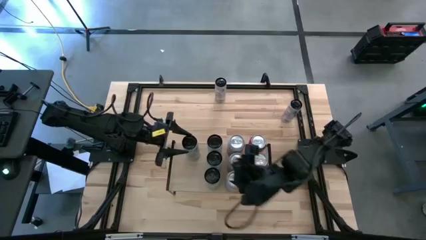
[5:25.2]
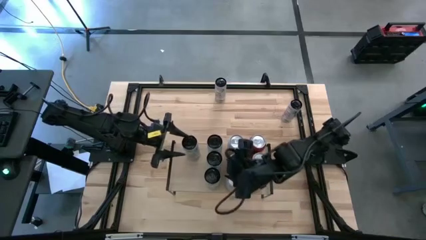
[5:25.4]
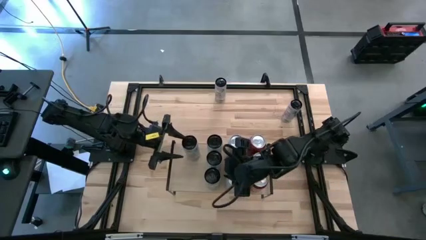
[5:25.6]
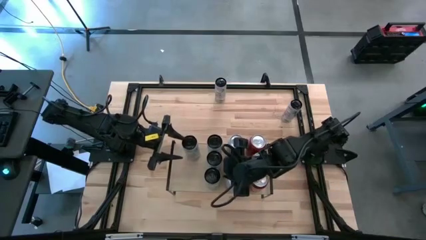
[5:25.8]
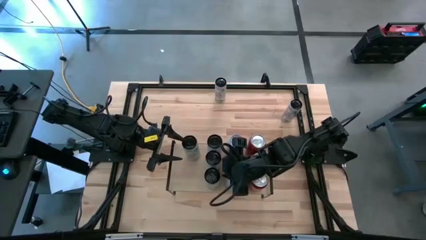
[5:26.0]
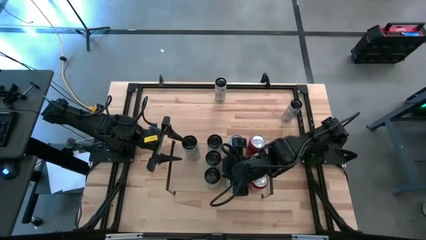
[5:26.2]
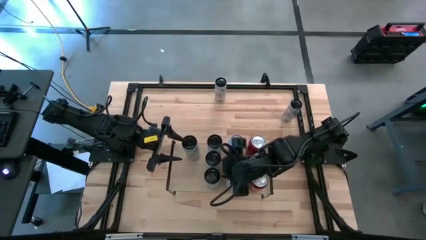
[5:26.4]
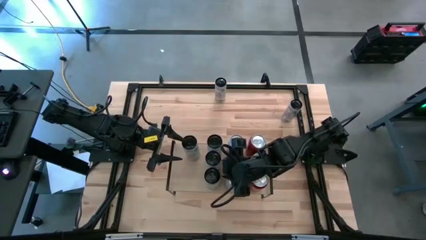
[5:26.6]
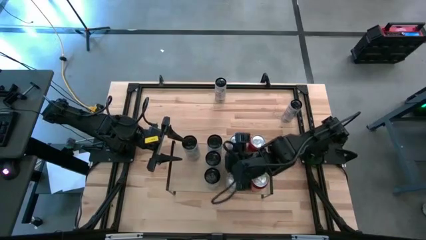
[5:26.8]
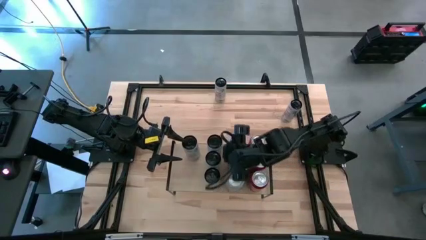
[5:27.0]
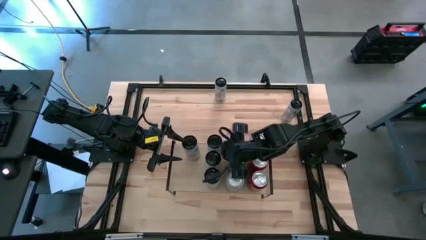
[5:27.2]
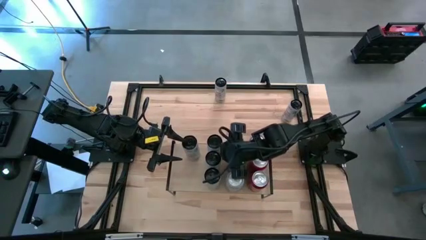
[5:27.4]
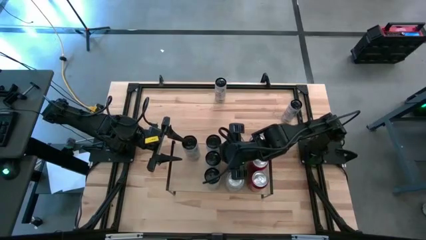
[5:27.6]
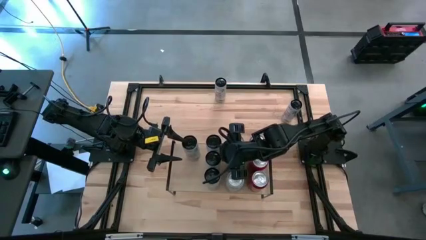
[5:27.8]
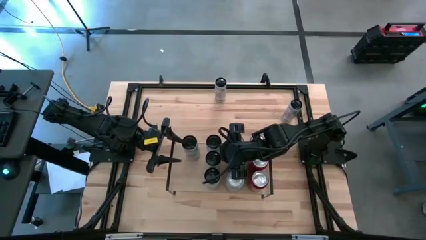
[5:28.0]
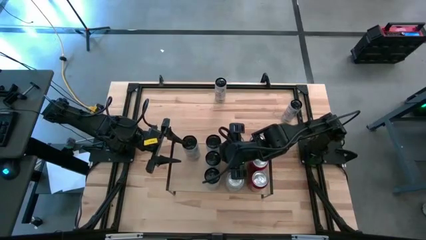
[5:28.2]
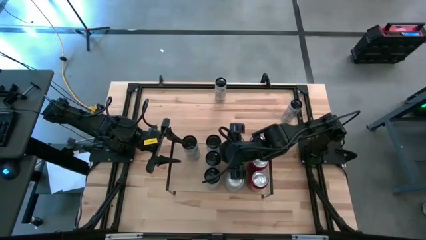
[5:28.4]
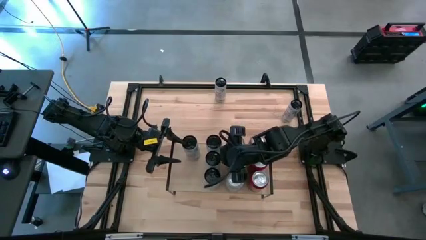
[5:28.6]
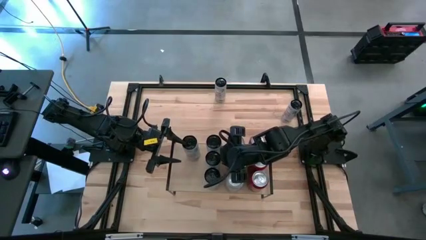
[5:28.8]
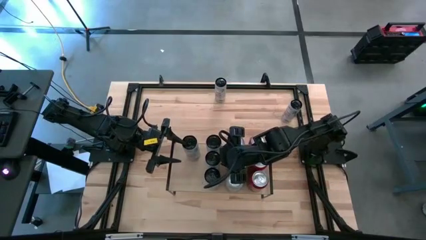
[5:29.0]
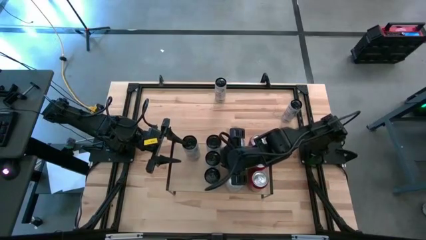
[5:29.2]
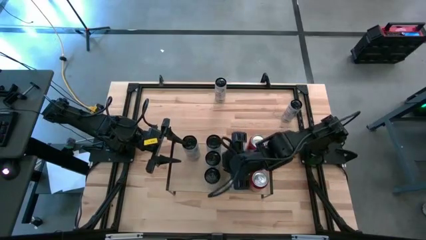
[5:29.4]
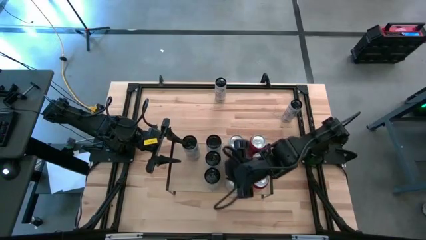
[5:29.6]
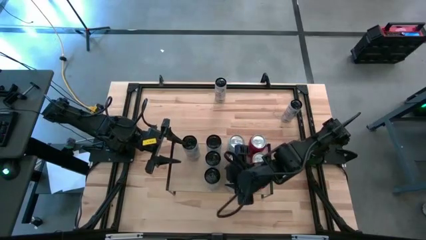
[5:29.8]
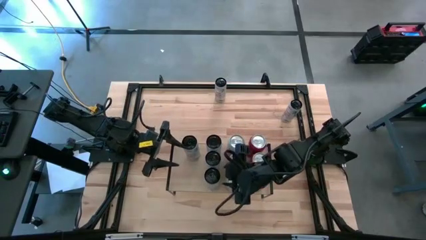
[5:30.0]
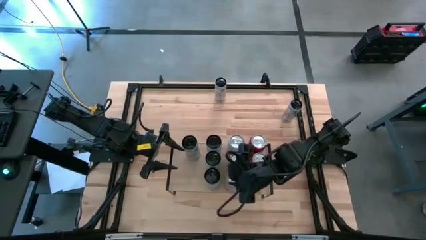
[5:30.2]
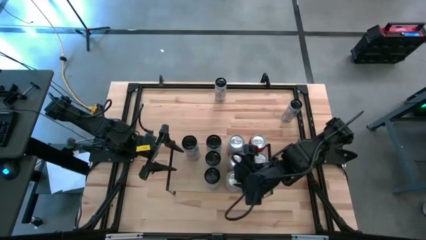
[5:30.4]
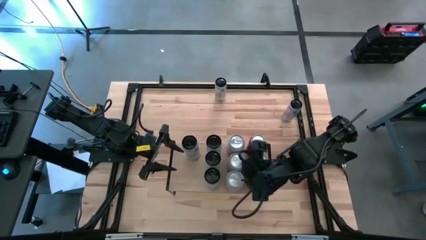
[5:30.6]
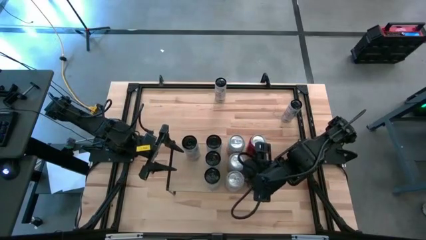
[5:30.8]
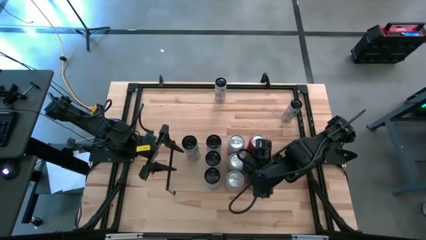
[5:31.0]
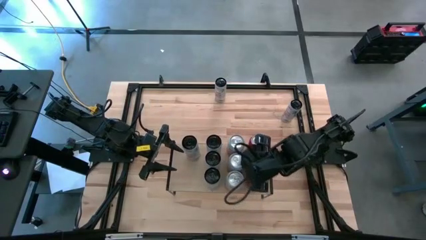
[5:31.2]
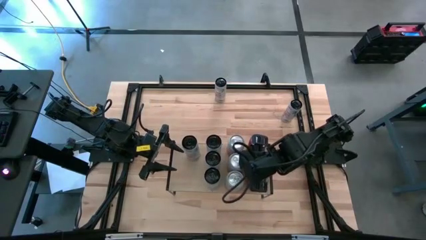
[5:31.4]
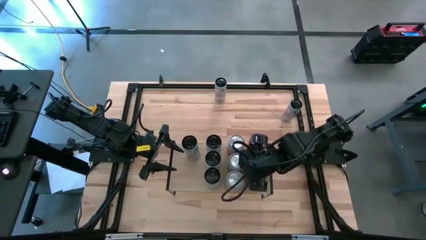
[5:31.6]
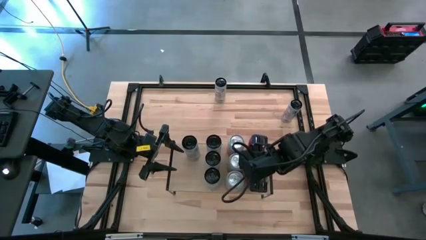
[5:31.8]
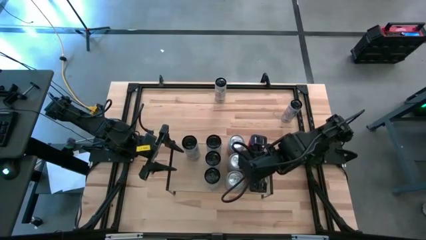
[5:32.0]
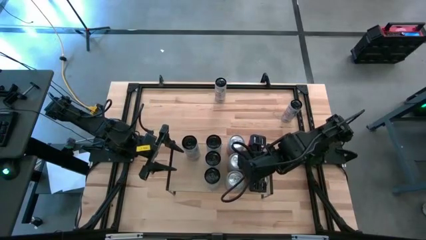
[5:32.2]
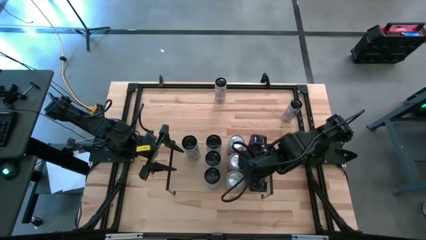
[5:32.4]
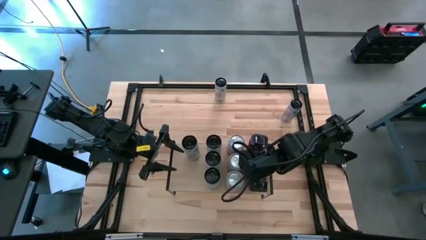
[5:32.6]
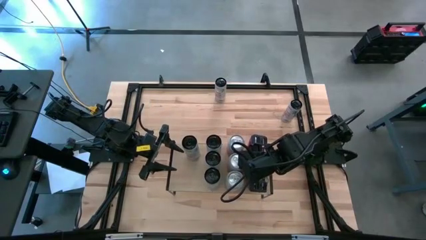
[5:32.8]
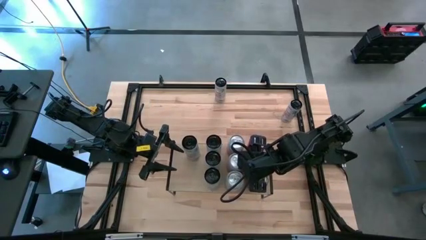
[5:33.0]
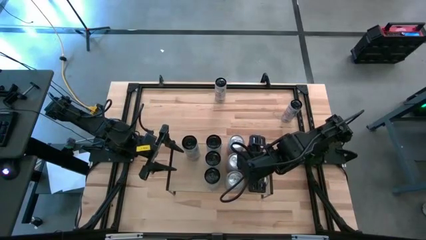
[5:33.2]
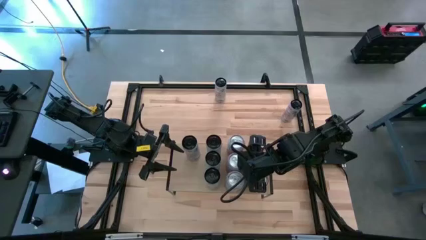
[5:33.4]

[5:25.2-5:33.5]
Task: Place canned beverage on shelf
Adjust the white-blue and pink-white soda cans on the shelf

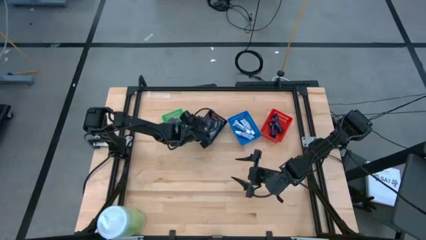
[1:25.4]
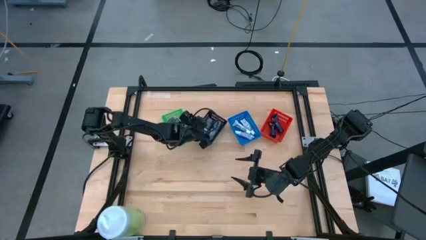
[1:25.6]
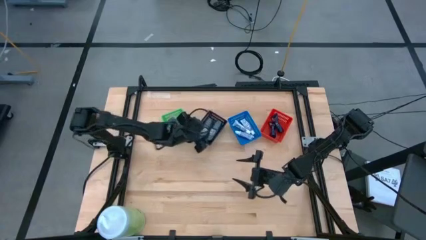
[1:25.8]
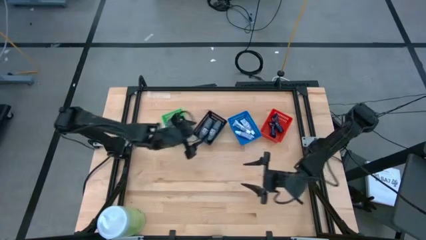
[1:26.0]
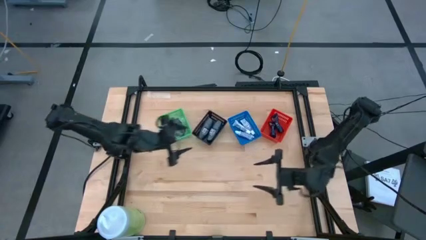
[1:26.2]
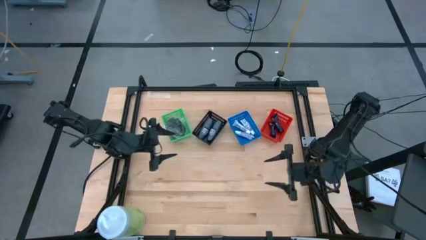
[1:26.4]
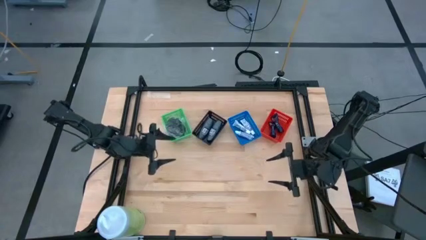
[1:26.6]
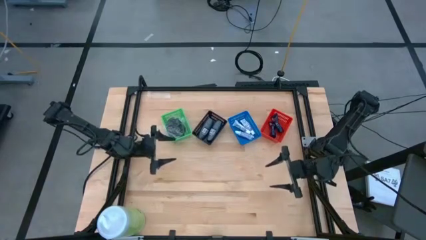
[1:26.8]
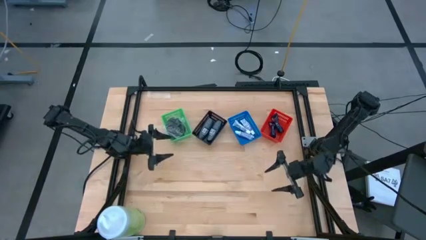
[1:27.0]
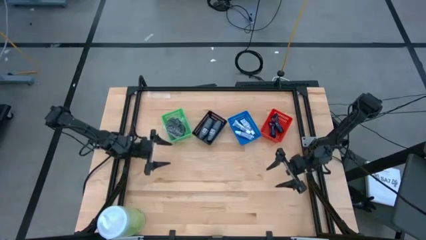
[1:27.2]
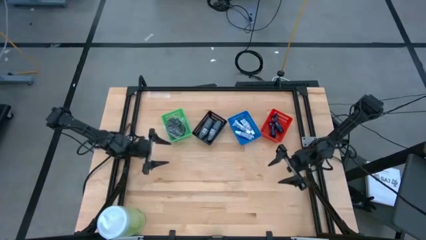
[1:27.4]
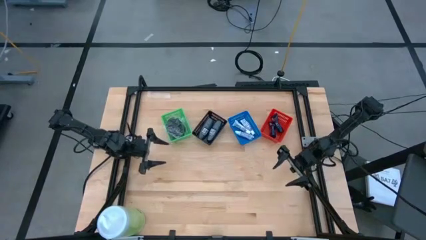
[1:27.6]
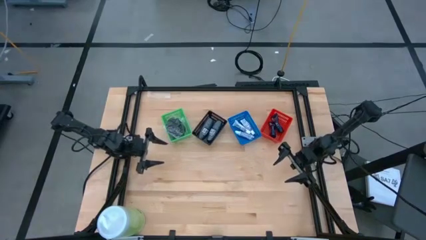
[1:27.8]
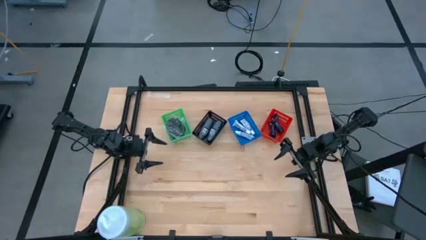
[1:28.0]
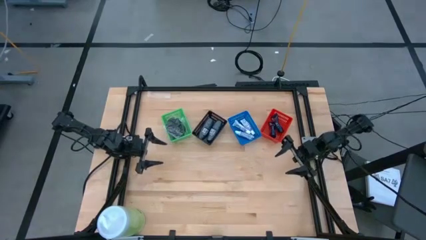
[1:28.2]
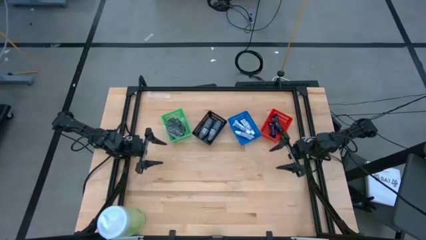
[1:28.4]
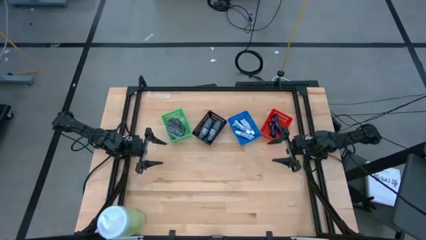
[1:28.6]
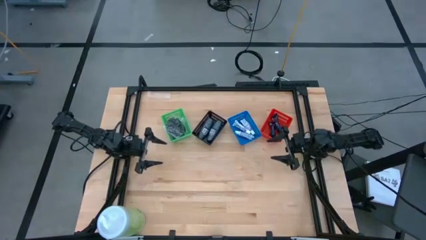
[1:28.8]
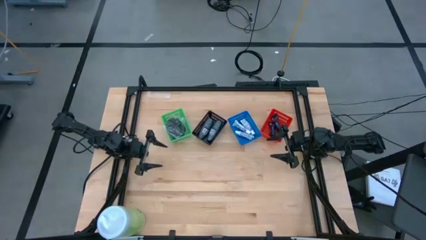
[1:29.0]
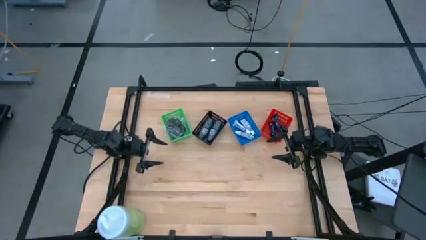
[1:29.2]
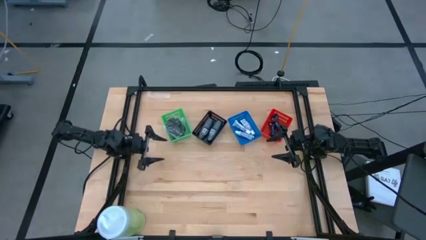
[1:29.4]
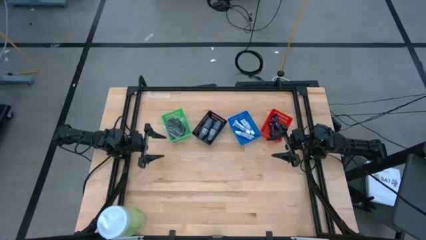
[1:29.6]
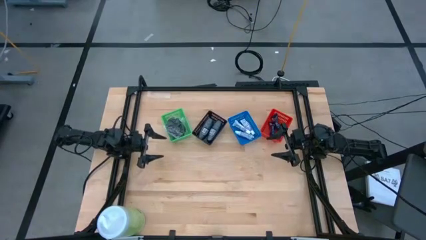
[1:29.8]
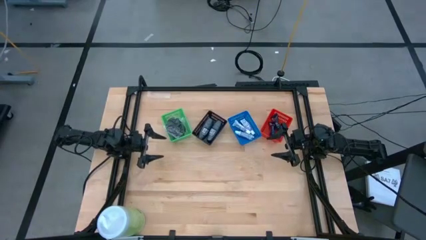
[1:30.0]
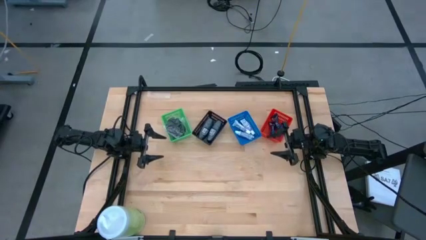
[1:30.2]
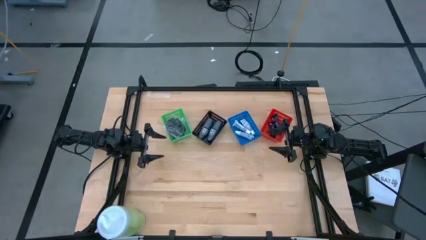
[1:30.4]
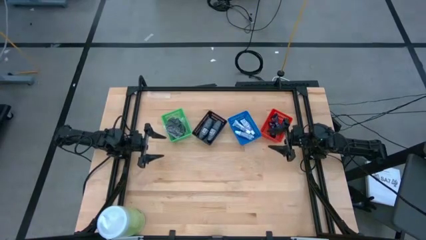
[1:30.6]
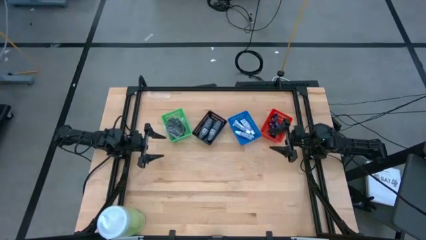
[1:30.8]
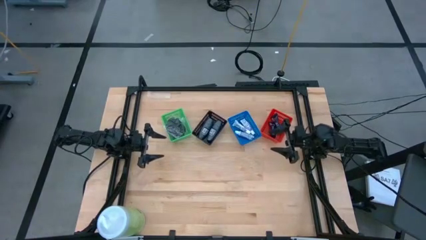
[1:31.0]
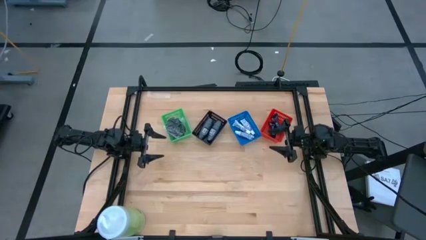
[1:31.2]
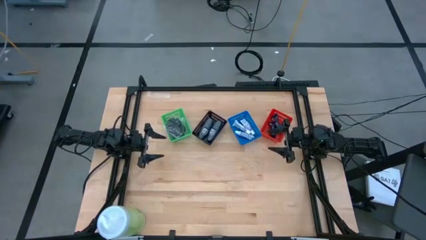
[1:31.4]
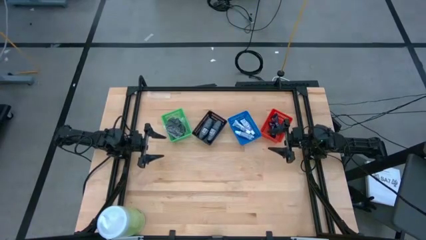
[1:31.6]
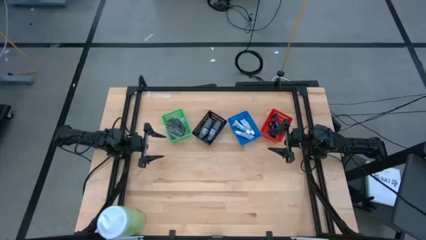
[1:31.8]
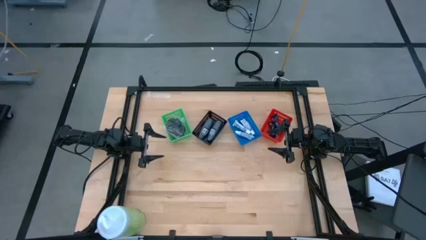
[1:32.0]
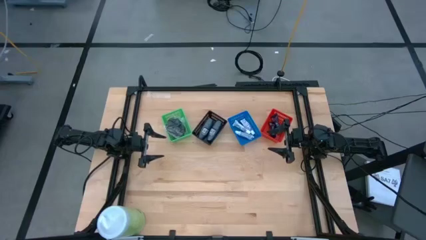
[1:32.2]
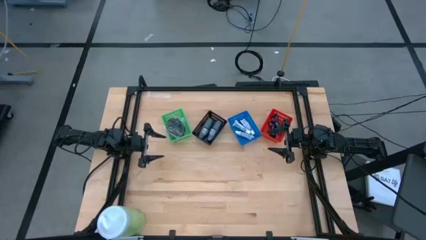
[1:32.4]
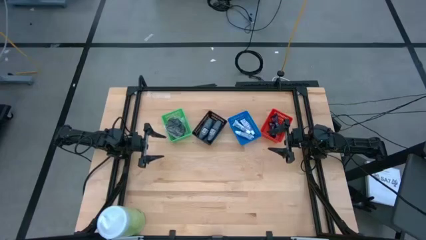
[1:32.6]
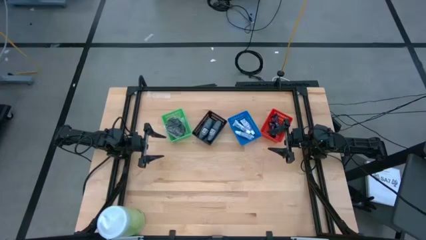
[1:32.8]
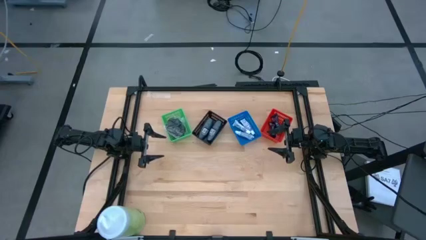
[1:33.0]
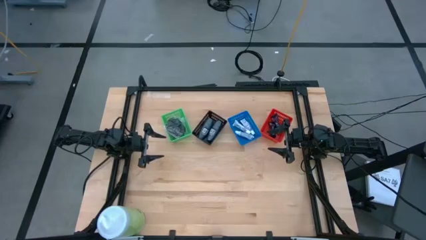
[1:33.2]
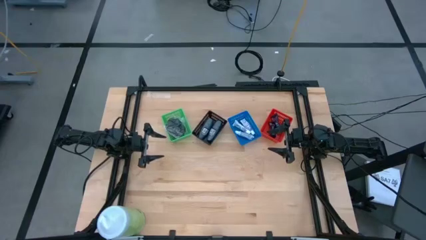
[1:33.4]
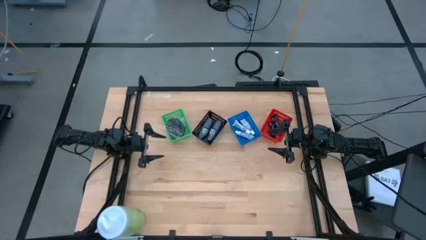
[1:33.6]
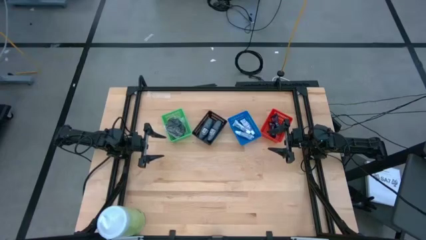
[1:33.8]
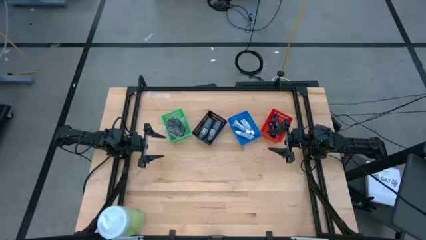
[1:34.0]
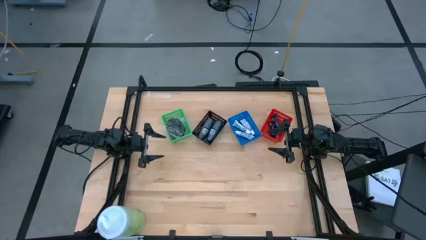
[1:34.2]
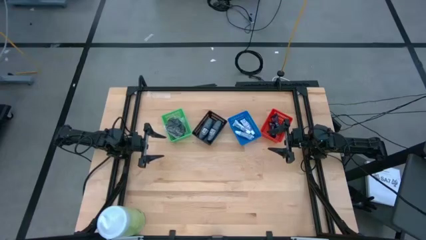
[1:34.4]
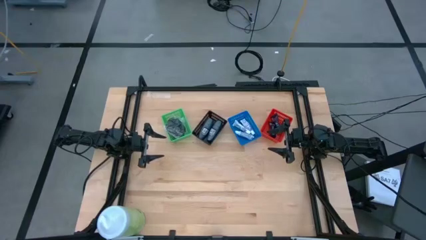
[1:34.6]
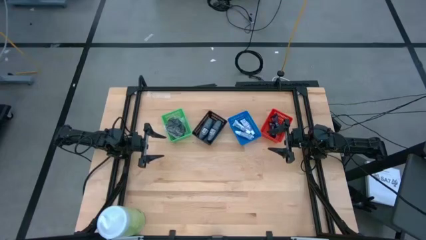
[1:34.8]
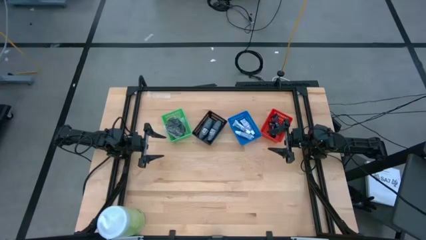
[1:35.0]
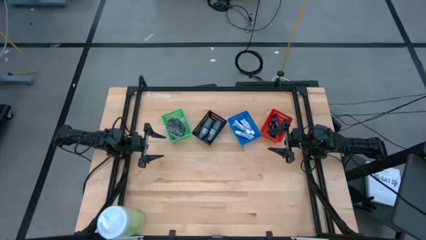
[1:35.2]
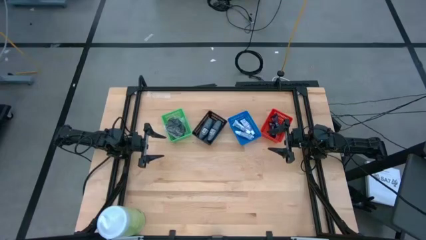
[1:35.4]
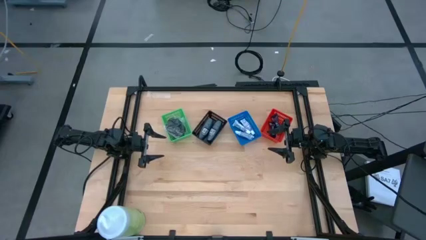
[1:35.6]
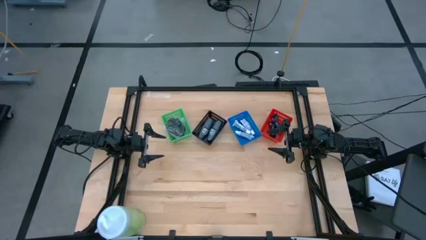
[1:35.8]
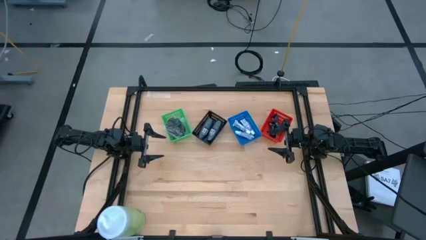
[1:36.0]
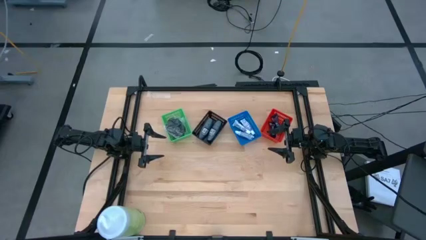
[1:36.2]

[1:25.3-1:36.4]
Task: Pick & Place Travel size toiletries
Return to Home Position
